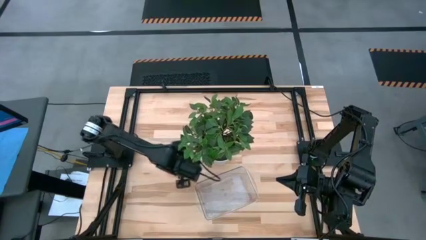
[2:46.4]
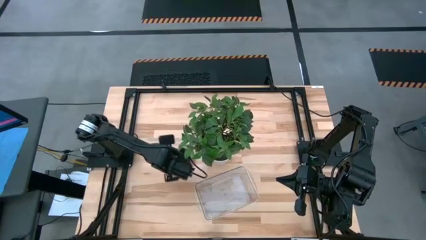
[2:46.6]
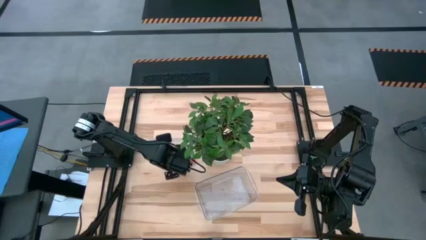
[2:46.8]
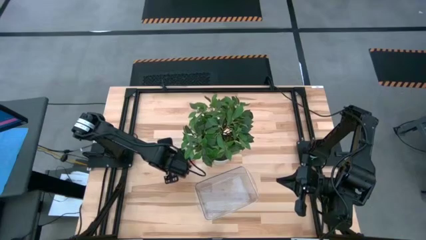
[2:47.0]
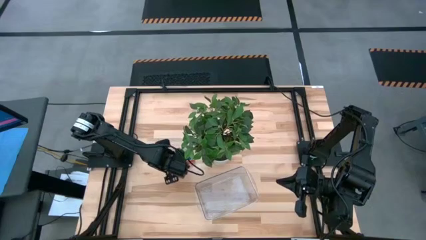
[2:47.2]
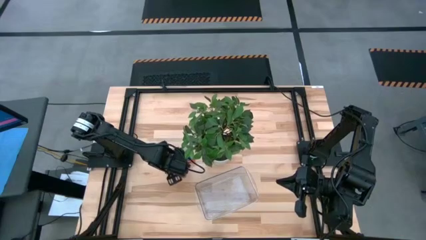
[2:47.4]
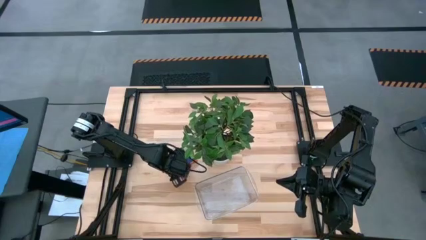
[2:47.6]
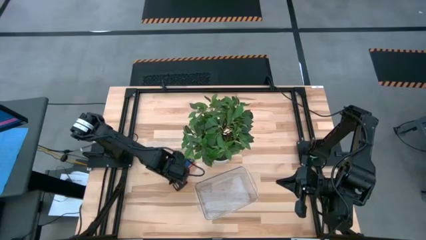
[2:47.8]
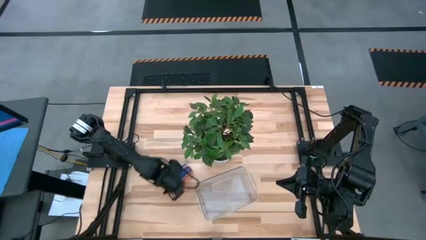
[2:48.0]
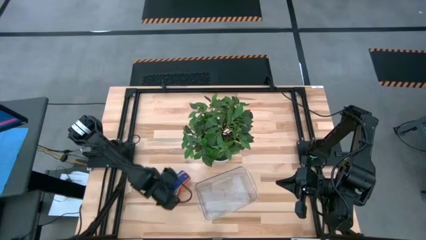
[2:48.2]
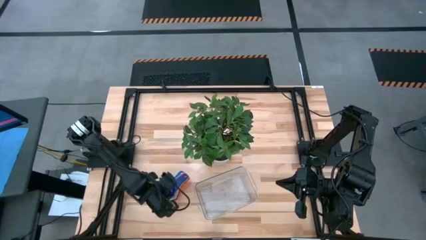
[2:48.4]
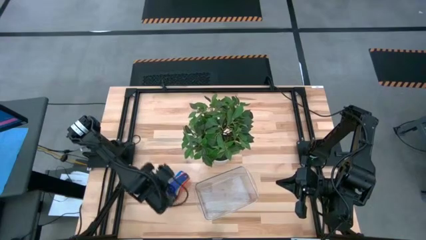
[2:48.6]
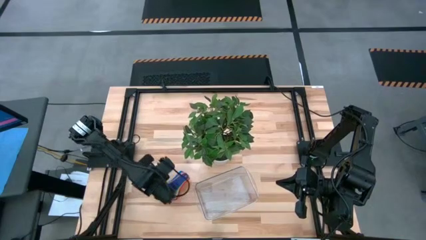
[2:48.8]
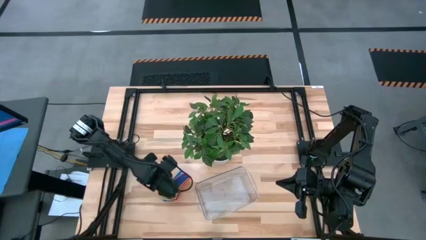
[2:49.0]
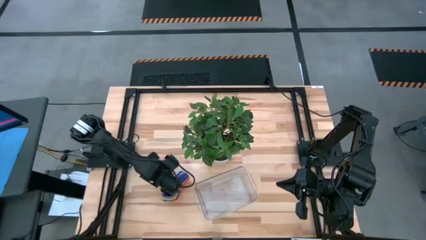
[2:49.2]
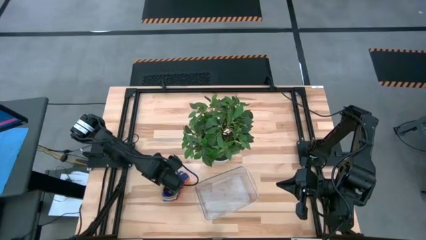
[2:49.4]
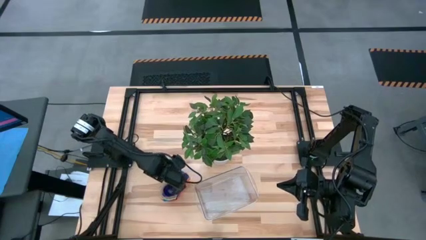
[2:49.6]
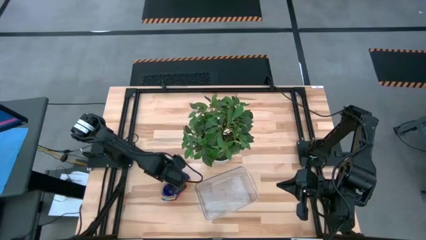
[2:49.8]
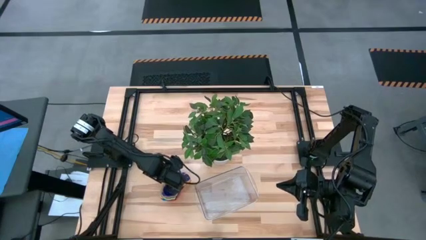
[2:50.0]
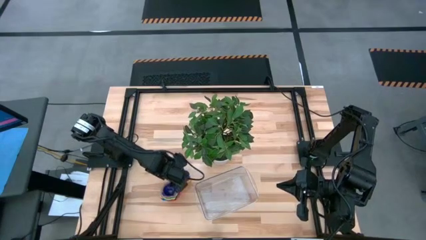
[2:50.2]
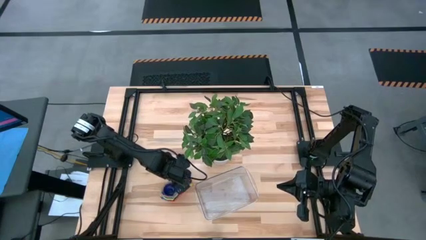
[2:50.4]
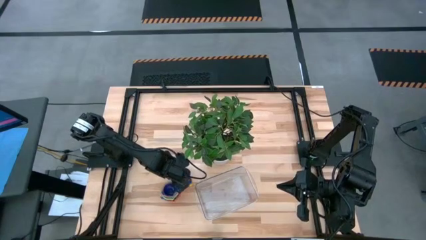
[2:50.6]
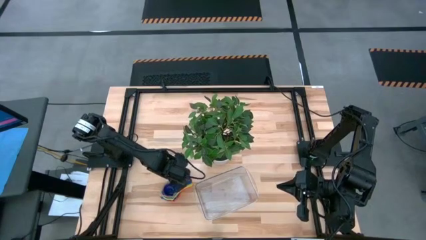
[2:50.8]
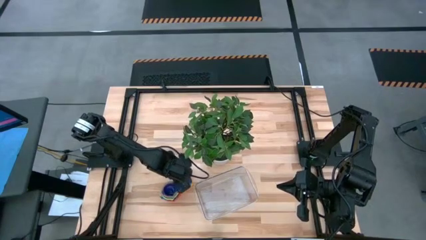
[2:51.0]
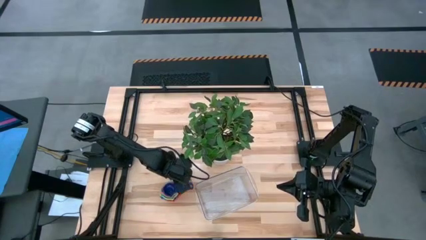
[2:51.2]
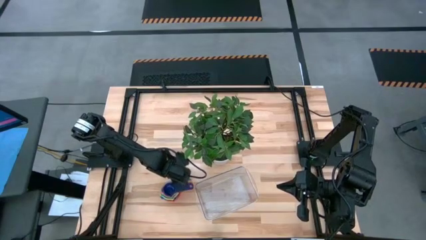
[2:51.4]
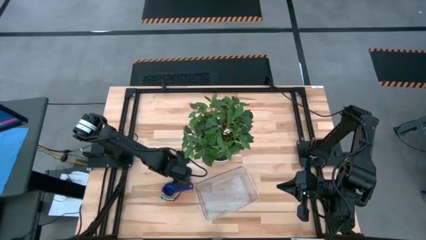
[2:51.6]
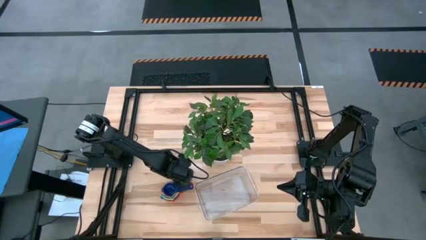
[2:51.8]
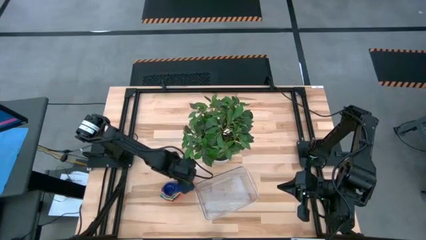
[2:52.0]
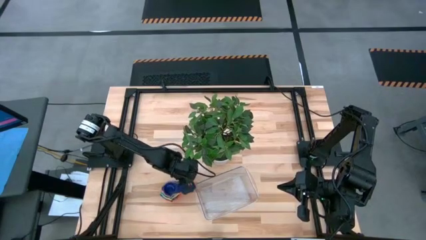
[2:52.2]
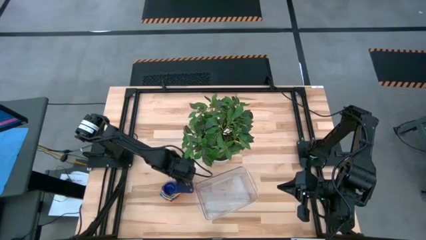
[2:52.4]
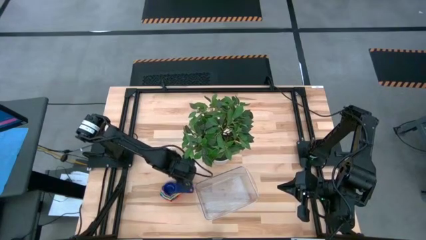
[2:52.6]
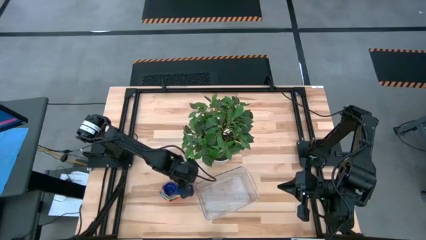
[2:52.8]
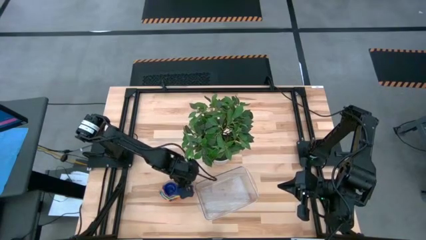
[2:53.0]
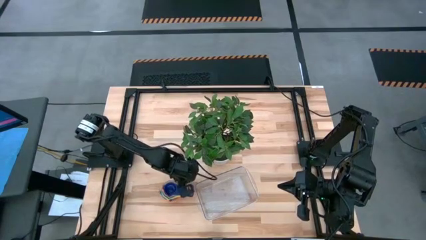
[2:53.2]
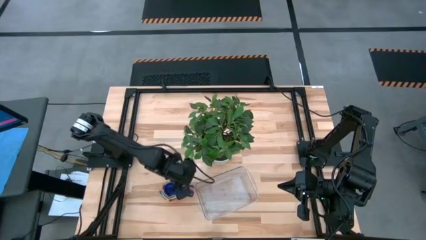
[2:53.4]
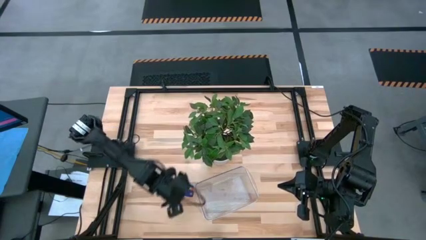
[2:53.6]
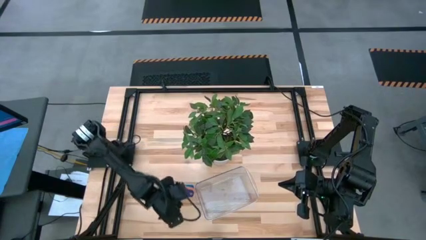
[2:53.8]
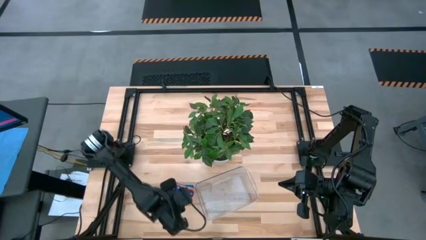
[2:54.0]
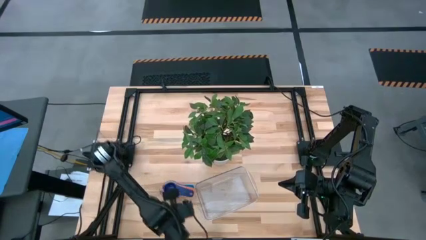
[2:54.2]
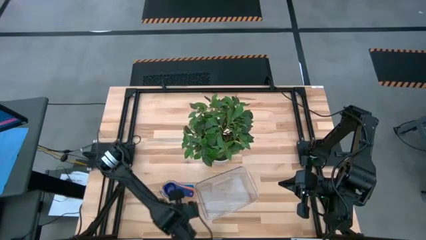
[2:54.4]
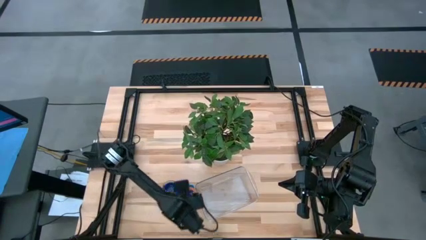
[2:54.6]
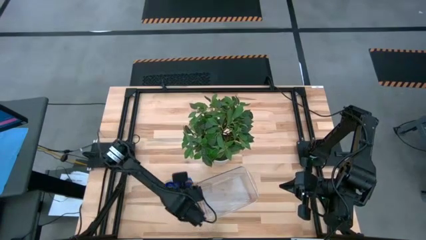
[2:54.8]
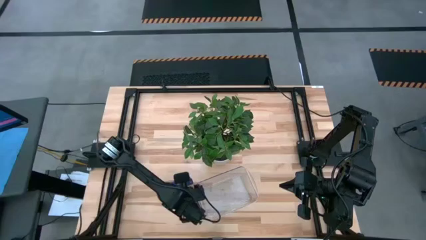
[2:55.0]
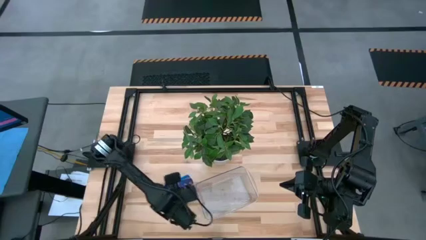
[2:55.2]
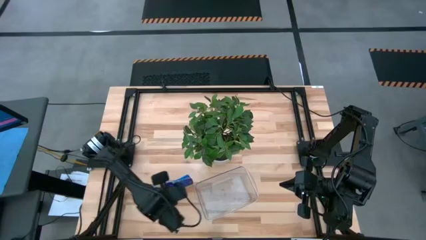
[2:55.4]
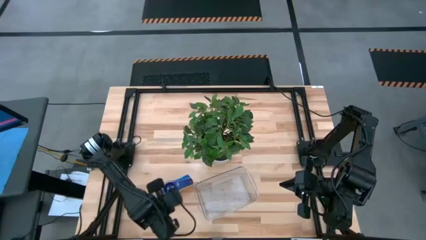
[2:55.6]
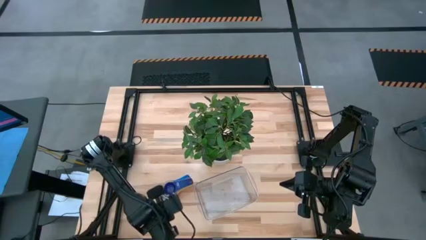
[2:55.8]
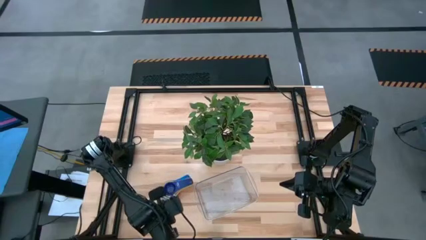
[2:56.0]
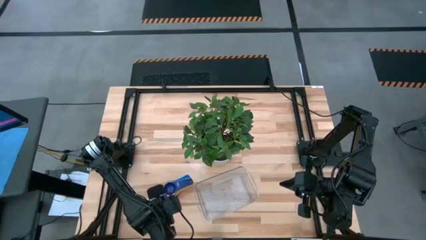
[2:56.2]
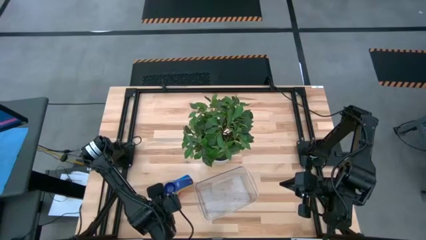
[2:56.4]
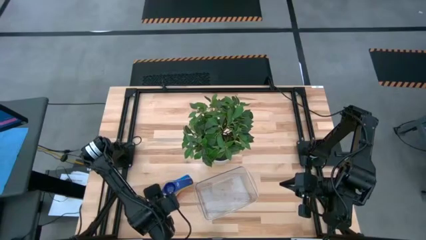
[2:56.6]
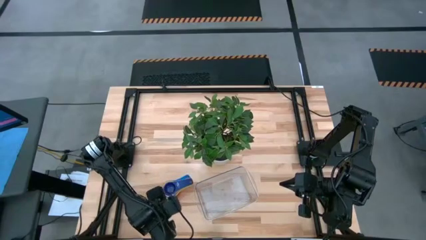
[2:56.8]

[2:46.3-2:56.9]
Task: Nest measuring cups in basket
Put the stacked measuring cup into the transparent bin

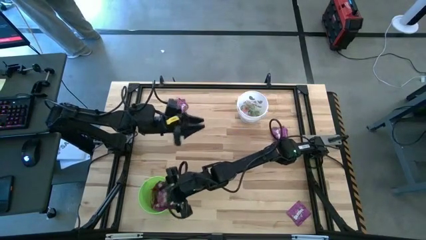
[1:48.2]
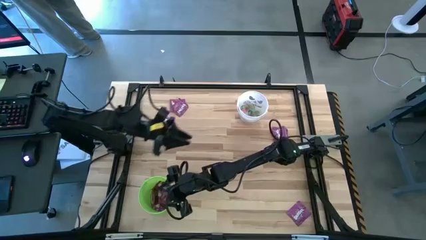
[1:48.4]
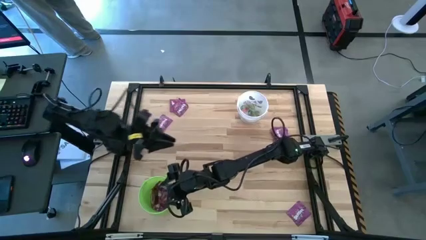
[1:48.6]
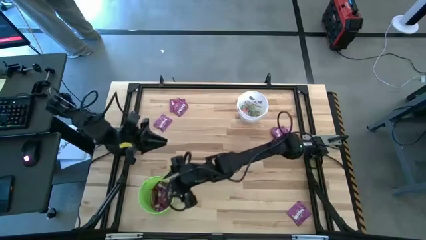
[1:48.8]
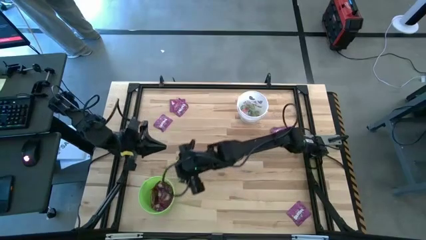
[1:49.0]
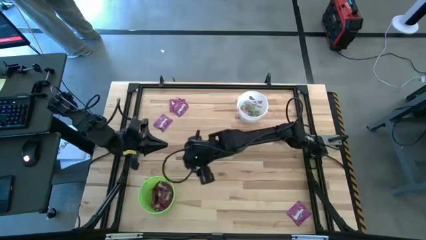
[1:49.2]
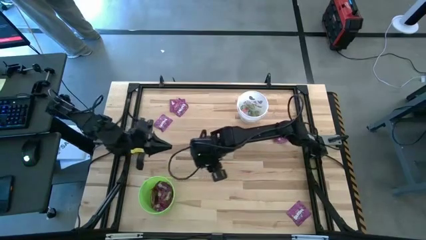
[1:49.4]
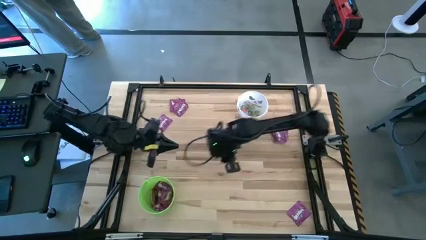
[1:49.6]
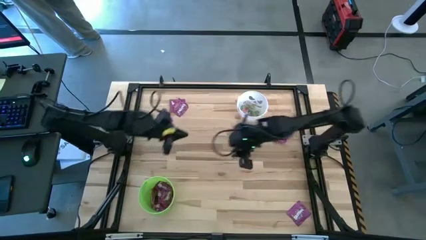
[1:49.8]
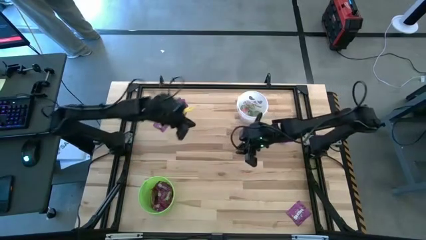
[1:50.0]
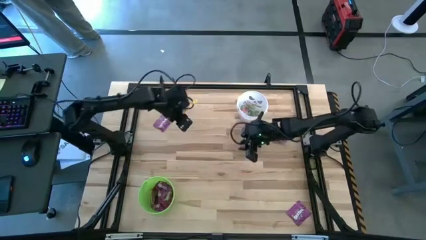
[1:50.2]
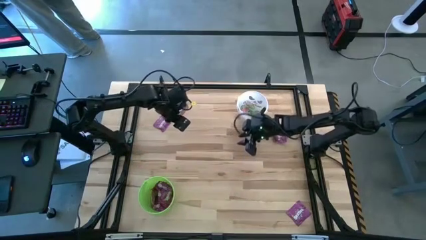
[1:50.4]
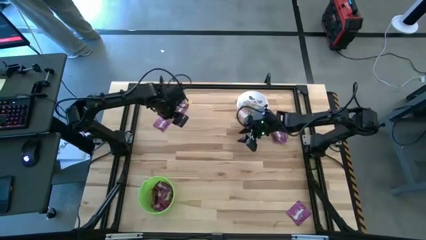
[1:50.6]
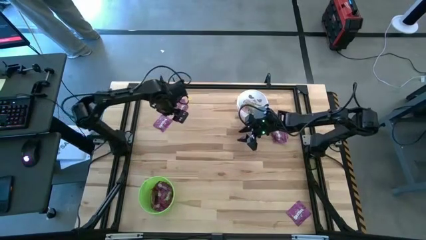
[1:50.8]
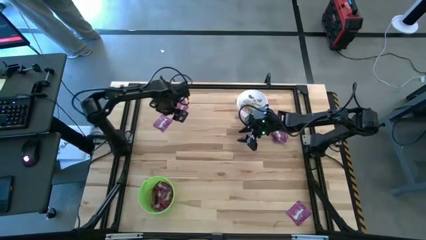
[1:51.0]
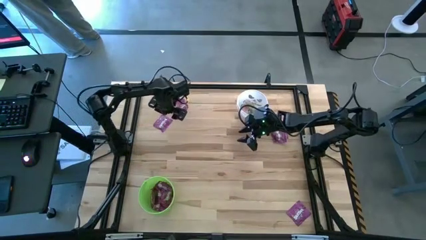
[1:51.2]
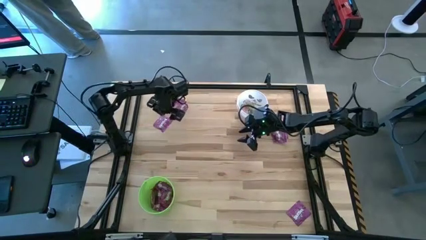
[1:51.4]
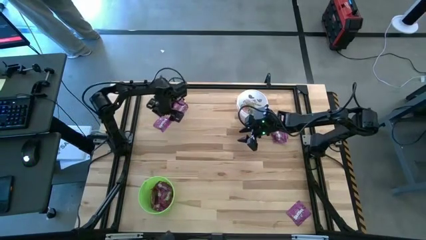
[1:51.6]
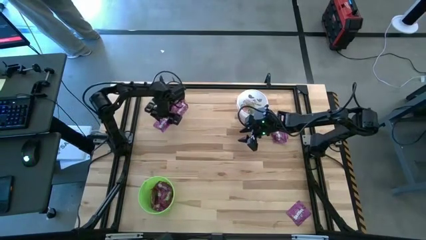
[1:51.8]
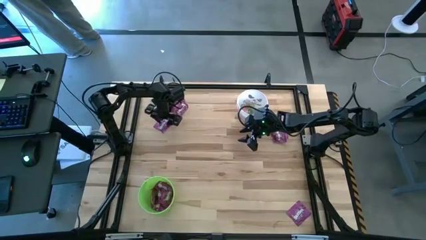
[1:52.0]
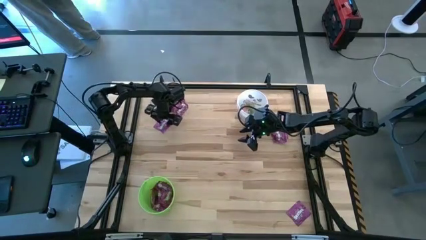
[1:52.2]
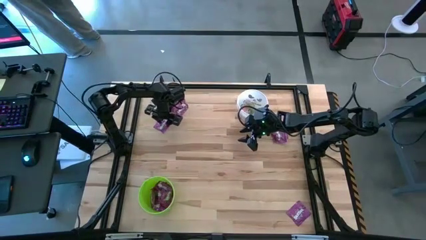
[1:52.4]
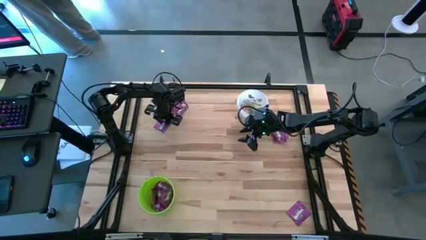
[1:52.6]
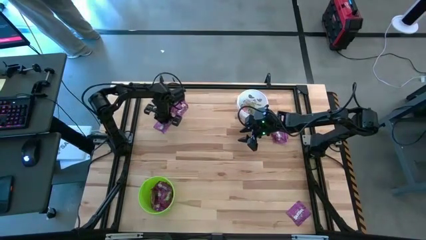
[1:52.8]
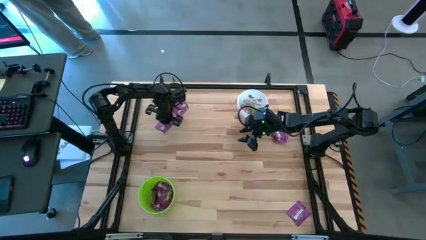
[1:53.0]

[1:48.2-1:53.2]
Task: Sort candy by brand, put in halloween buckets
Put the purple candy into the green bucket

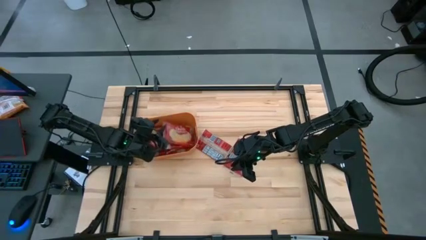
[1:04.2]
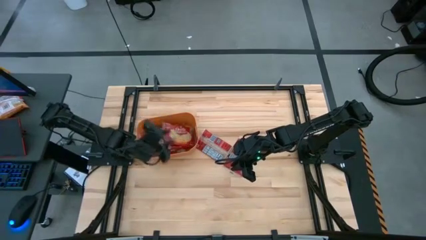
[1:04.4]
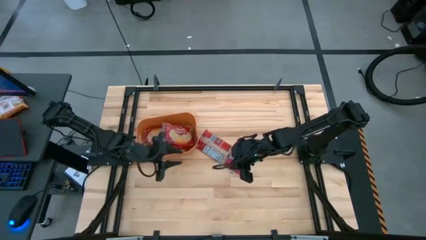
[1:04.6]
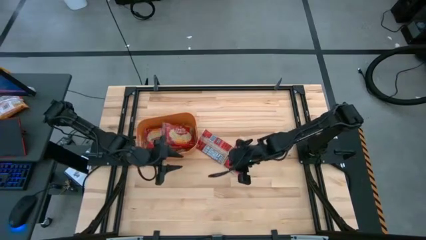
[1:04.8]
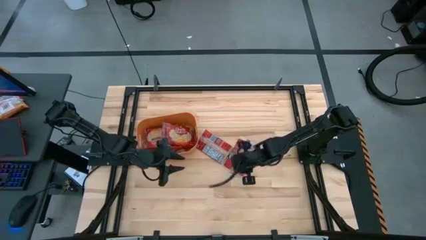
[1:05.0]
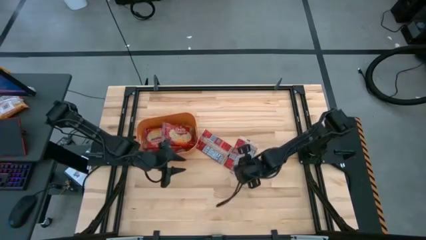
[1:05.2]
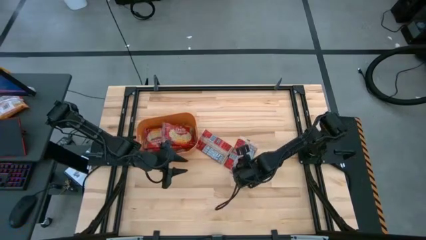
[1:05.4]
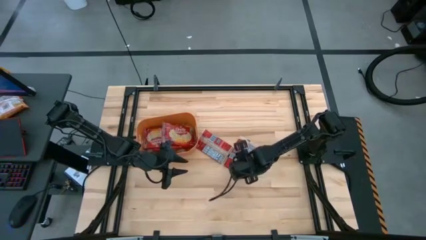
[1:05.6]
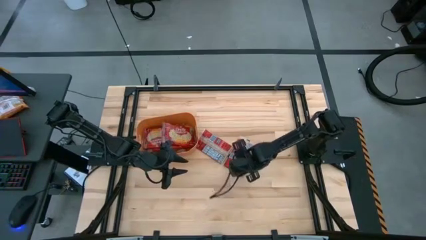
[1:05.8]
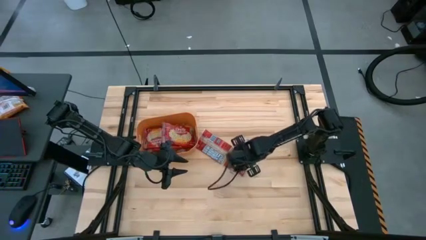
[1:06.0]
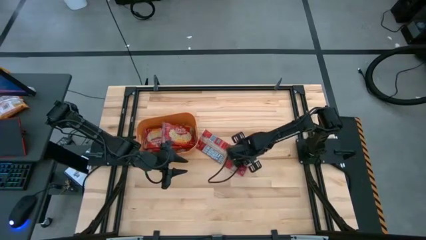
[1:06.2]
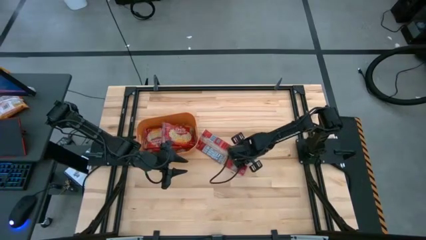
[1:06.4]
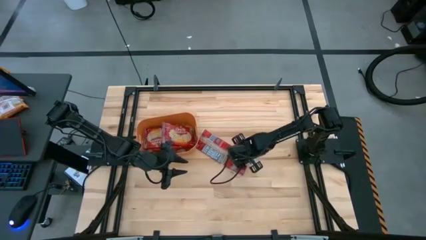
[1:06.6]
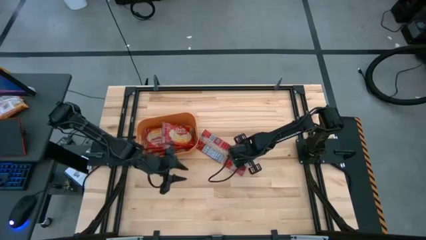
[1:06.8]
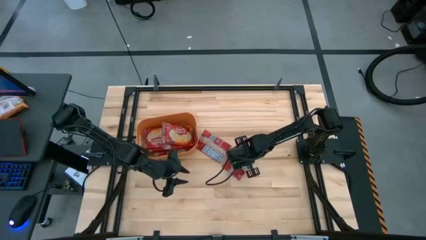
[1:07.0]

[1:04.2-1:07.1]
Task: Sort popcorn bags into baskets
Put the red popcorn bag into the orange bin
